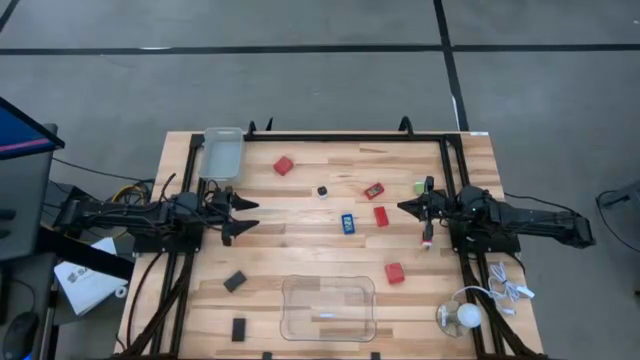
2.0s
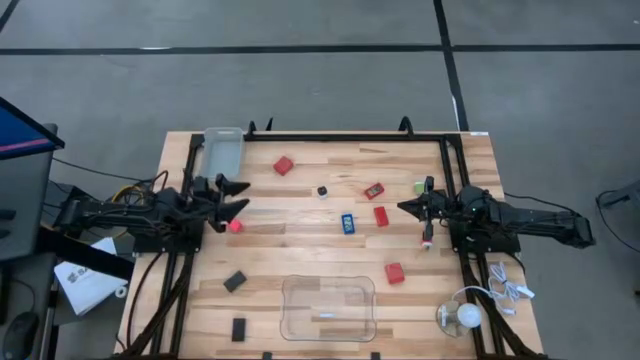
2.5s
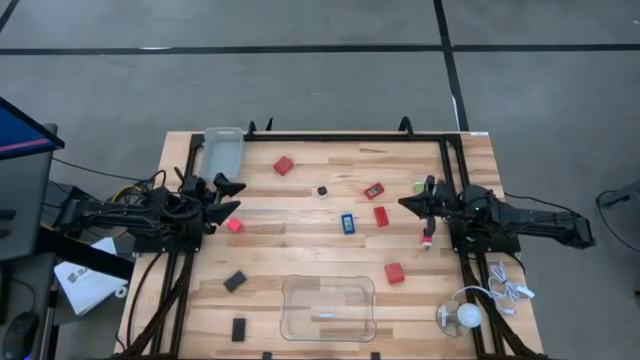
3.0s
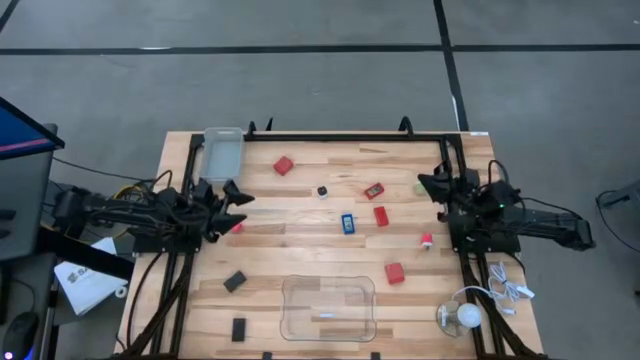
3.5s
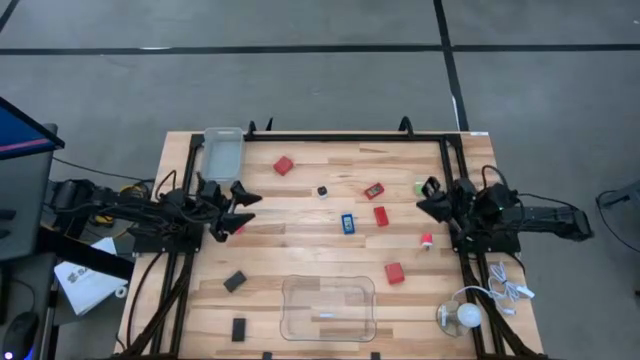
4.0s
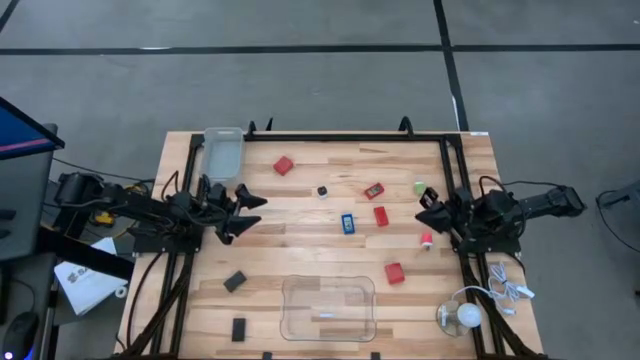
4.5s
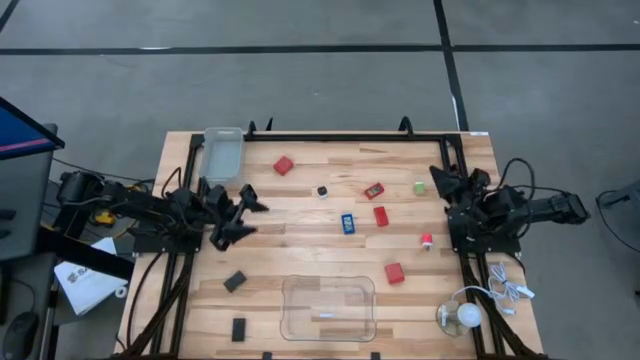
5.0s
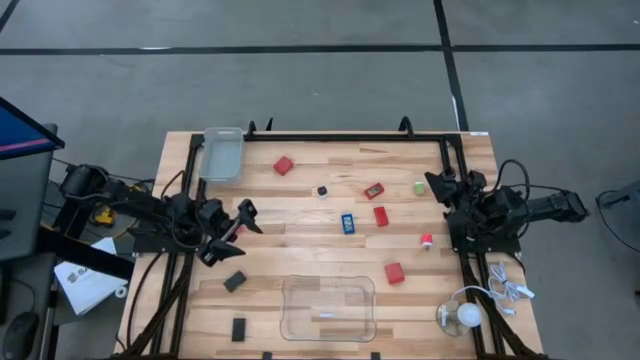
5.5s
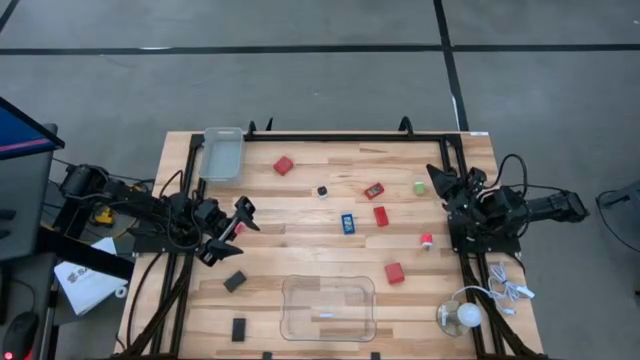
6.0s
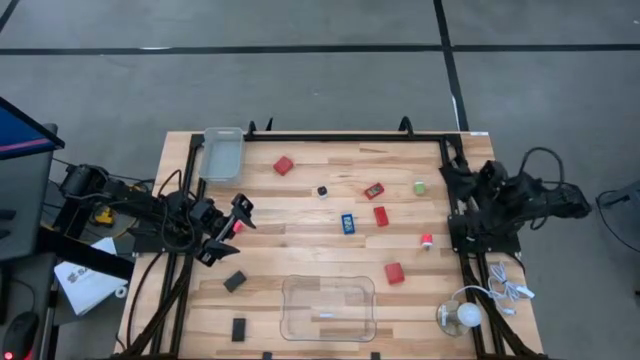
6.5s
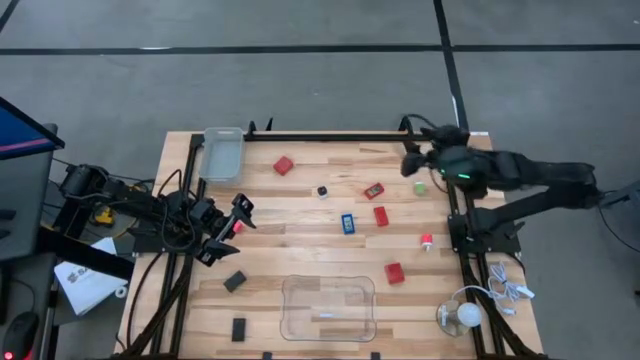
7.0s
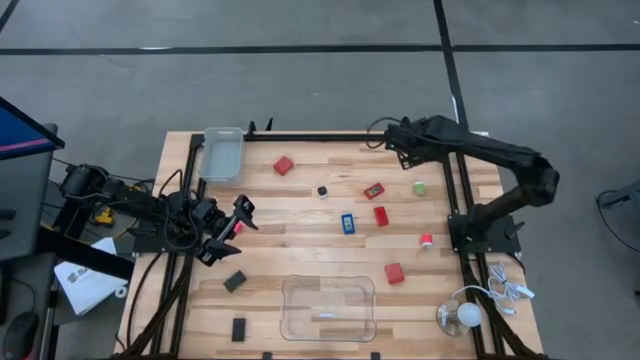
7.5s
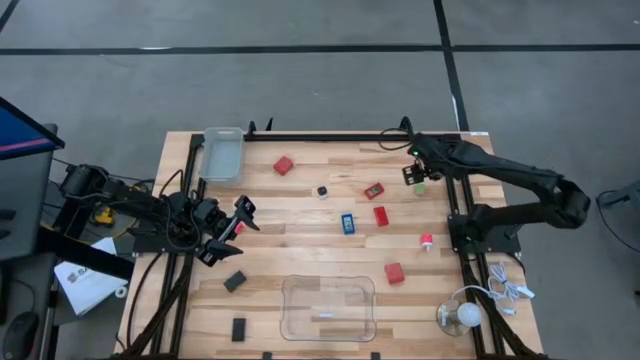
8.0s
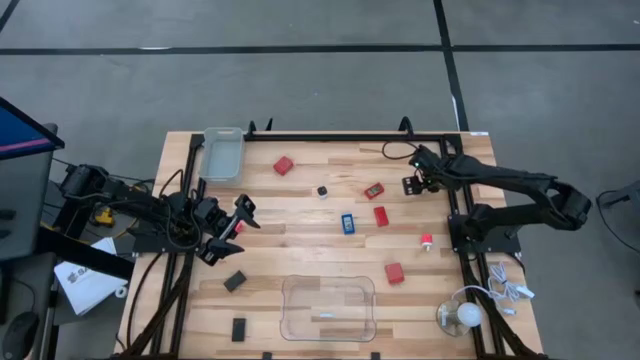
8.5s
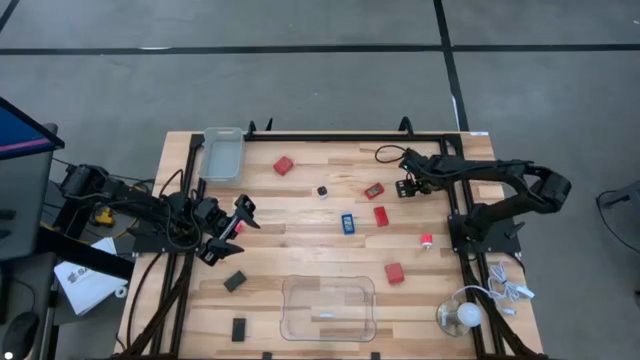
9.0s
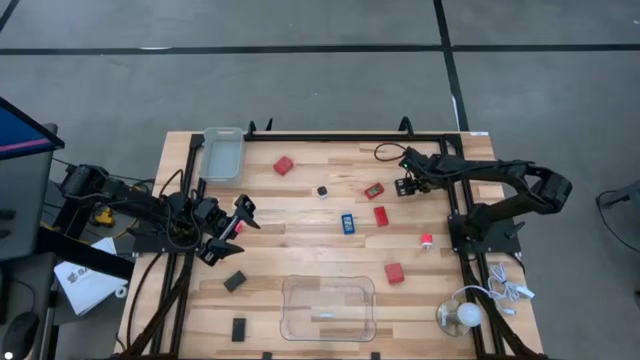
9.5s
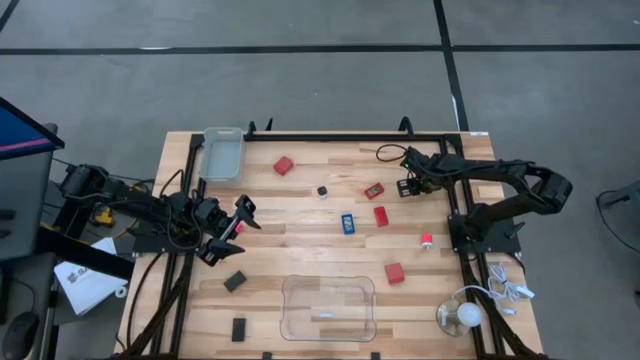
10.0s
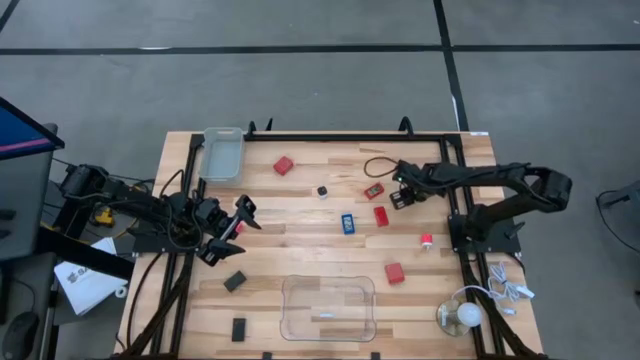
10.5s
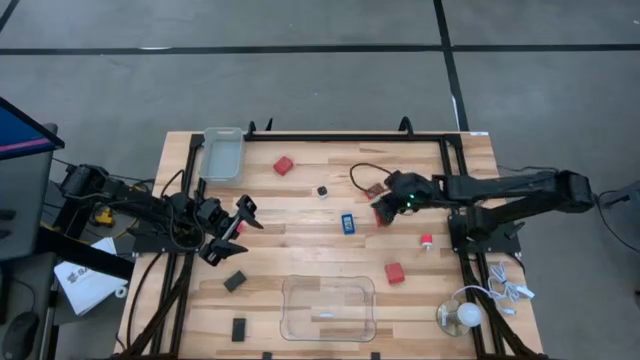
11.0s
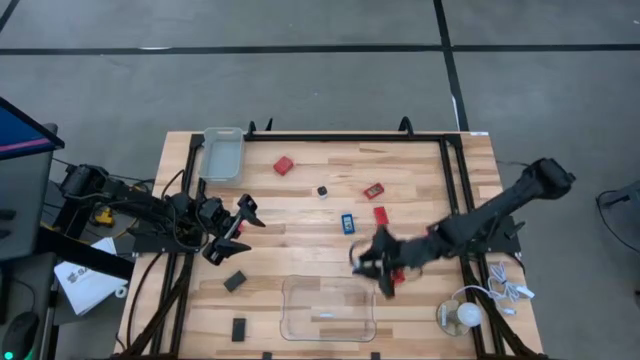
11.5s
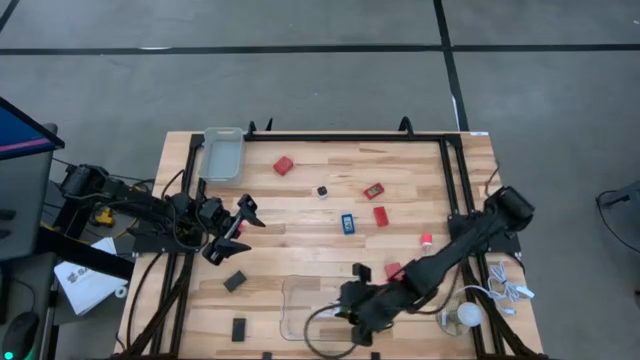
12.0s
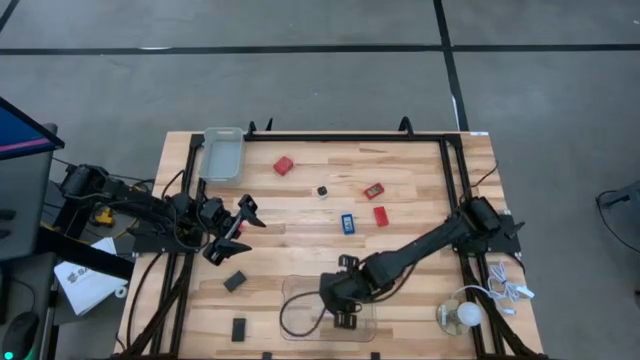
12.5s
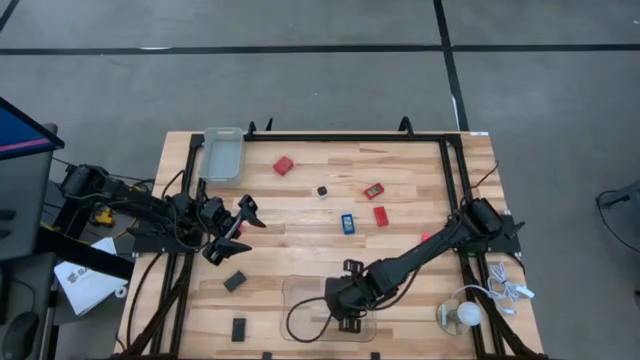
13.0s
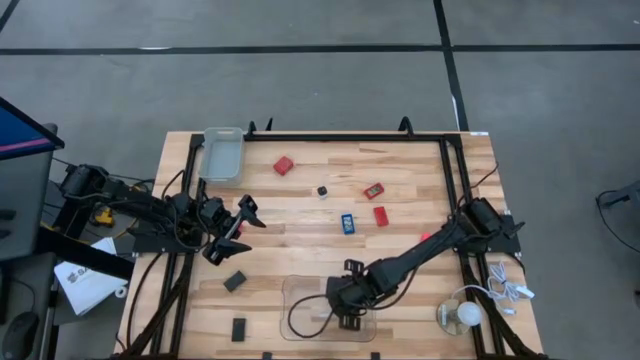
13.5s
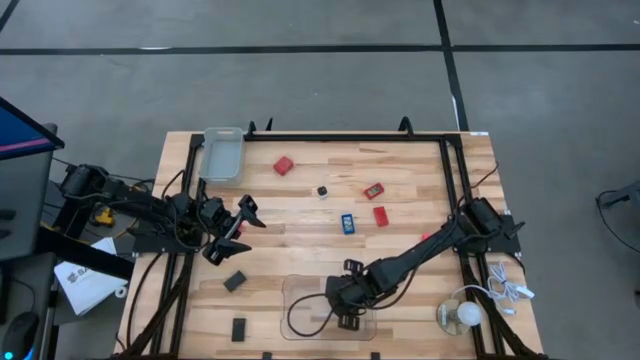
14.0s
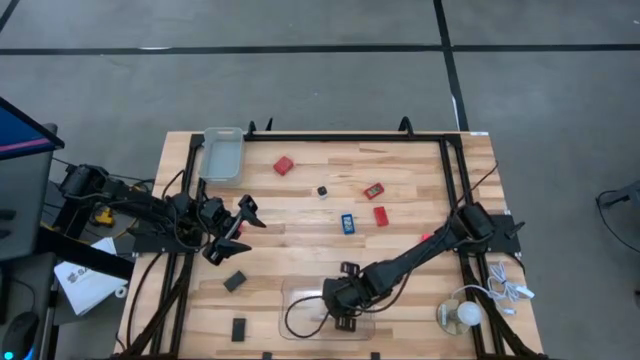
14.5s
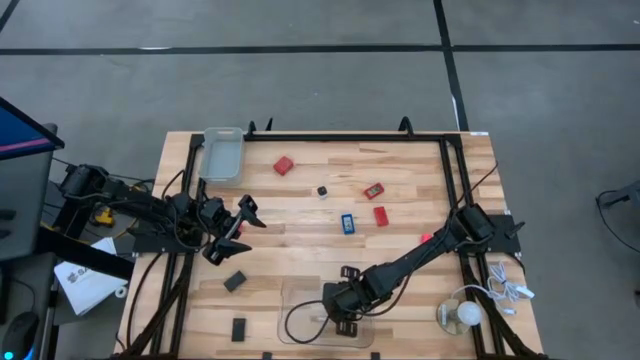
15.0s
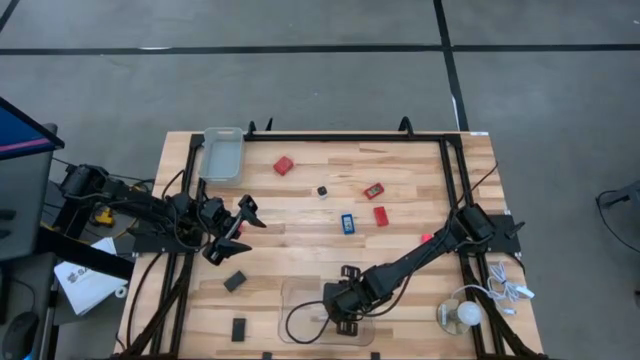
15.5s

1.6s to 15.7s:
Task: Pick & Place Office items
Put the green charger adapter into the transparent bin

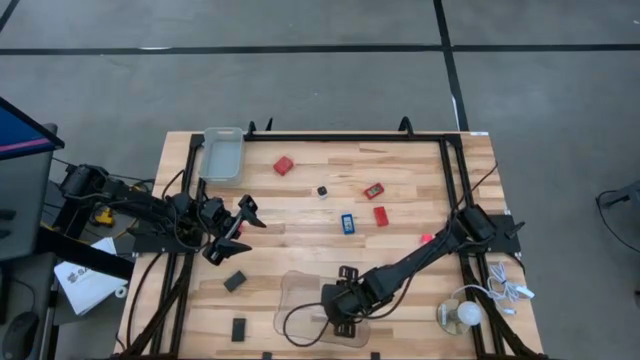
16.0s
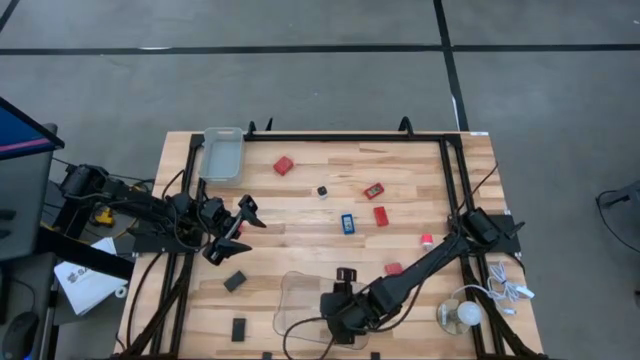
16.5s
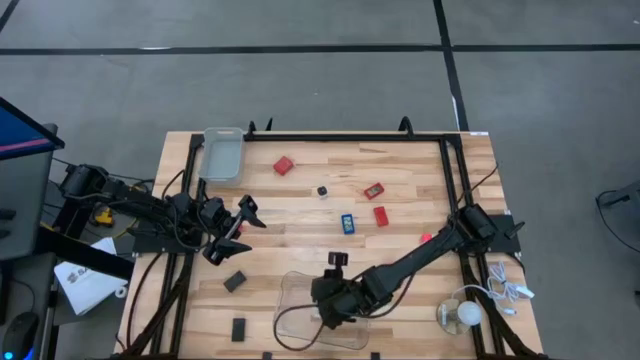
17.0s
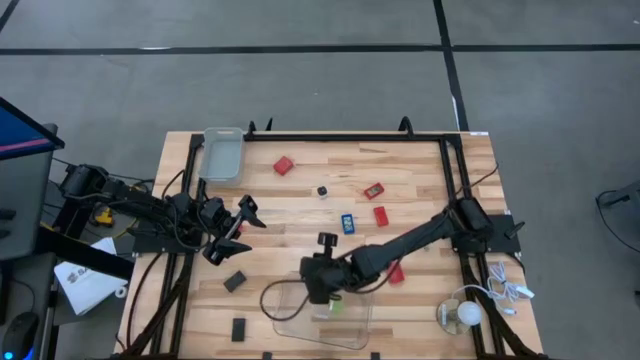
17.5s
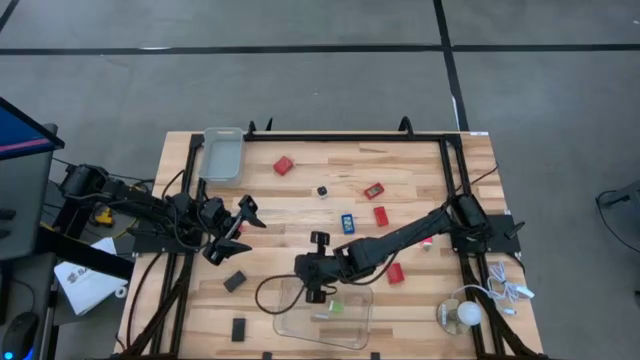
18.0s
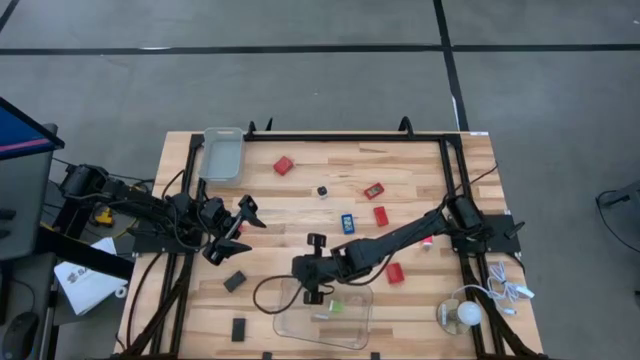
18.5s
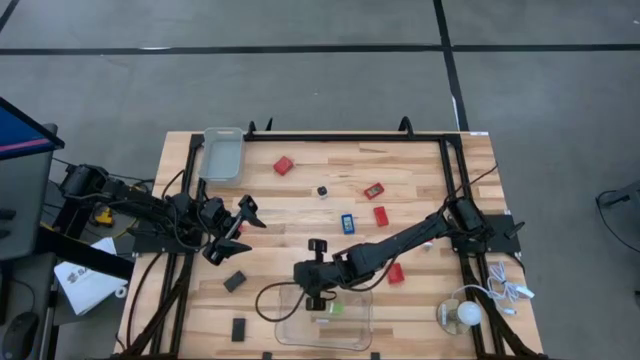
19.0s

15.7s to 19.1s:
Adjust the transparent bin

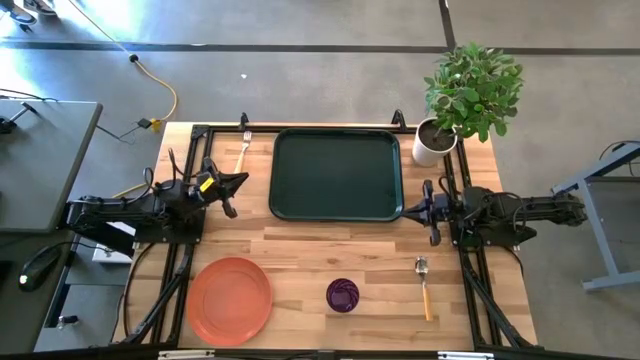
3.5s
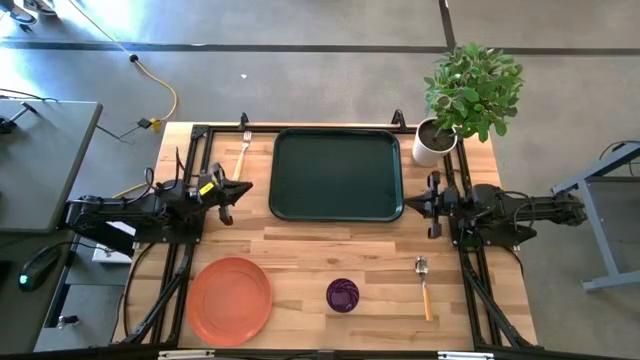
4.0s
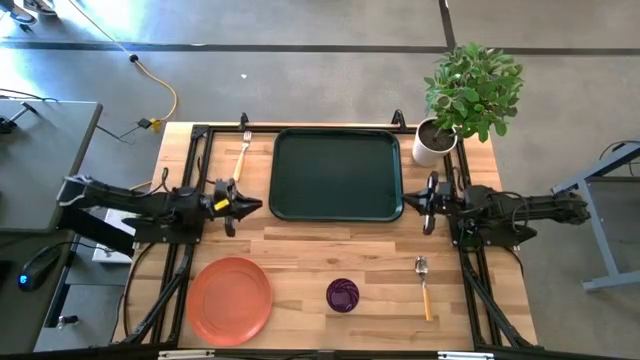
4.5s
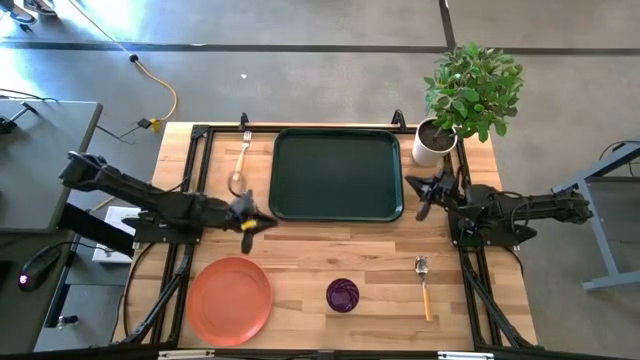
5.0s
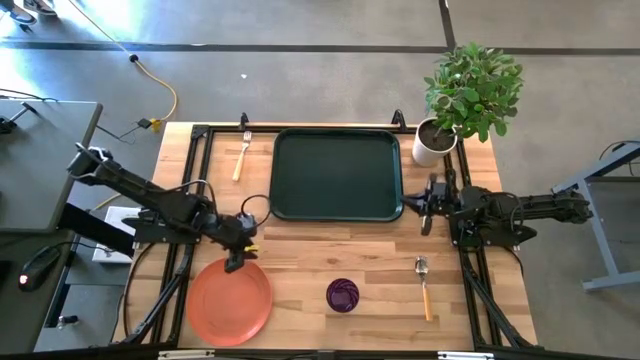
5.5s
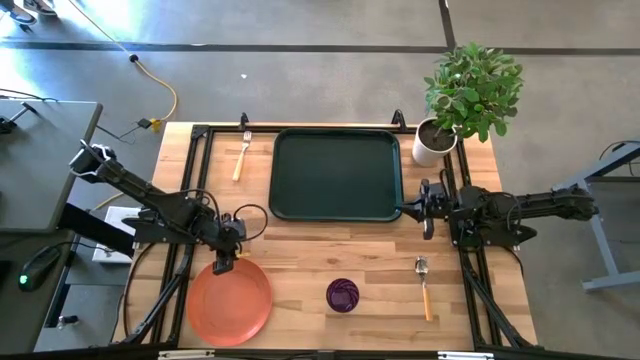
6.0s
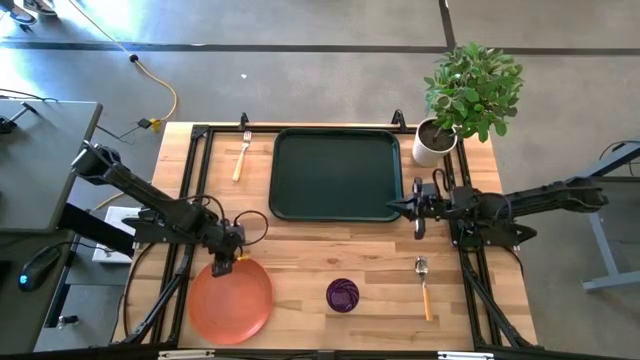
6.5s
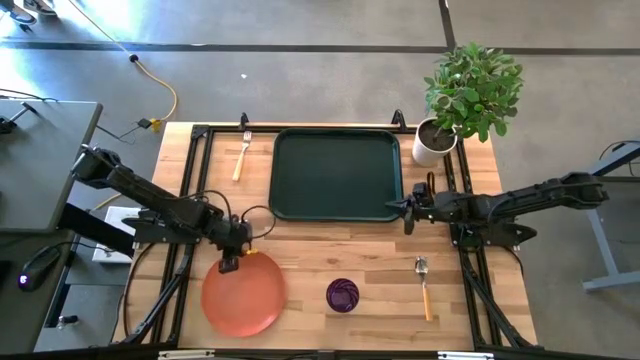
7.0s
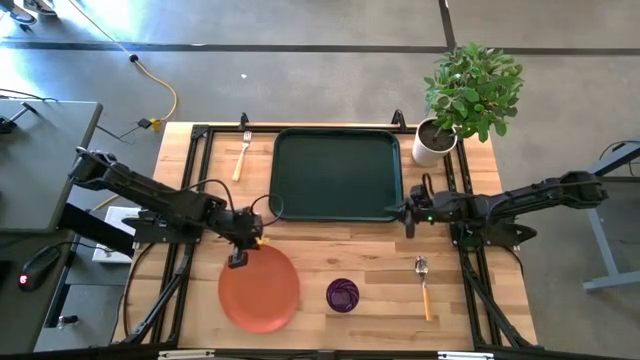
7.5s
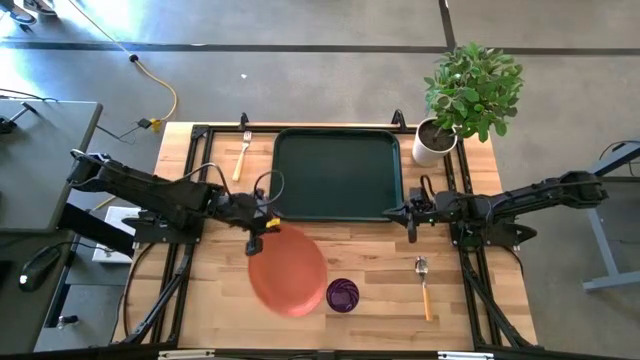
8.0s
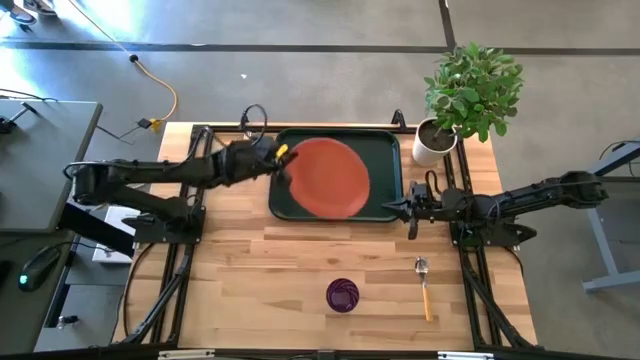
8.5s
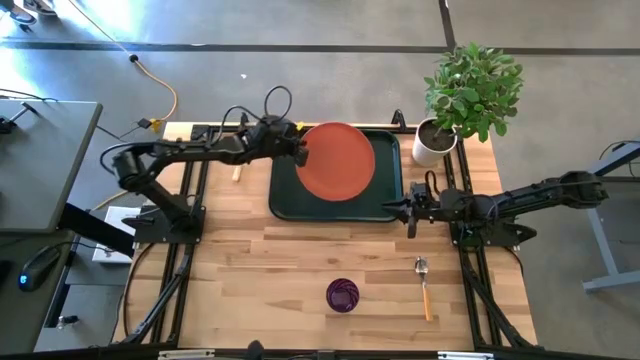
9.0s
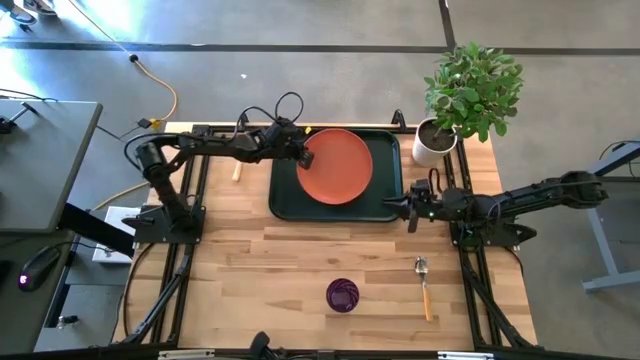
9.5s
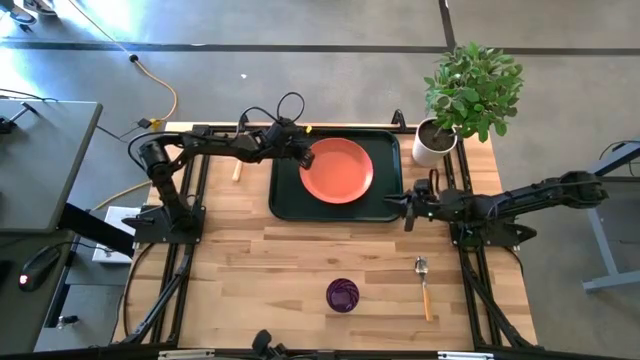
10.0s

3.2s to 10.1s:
Task: Pick and place plate/cup/fork/spoon on tray
Put the orange plate on the dark green tray
